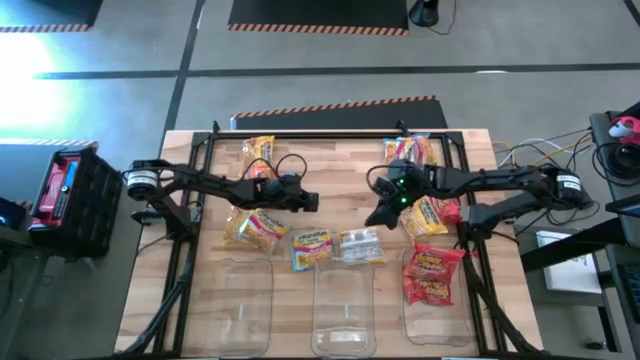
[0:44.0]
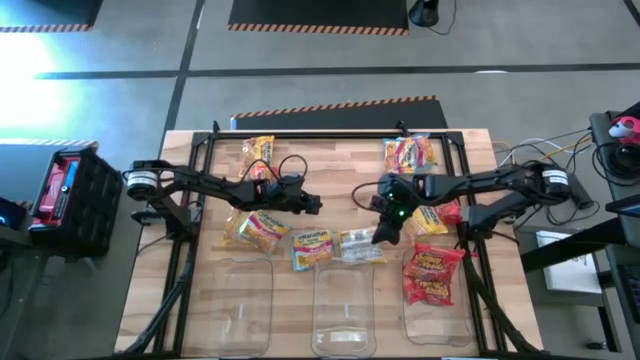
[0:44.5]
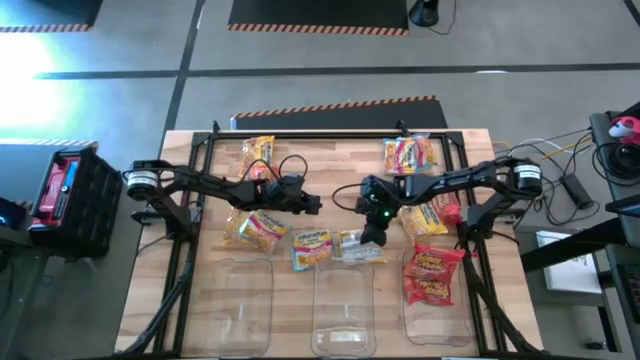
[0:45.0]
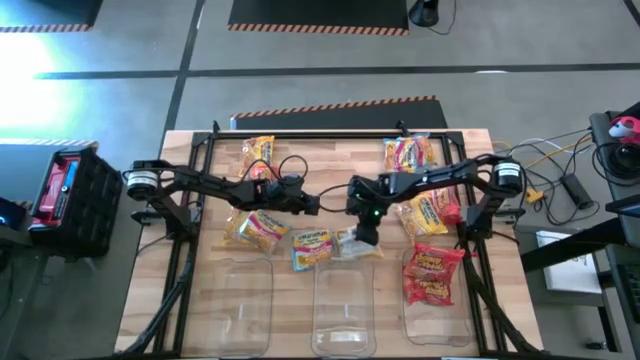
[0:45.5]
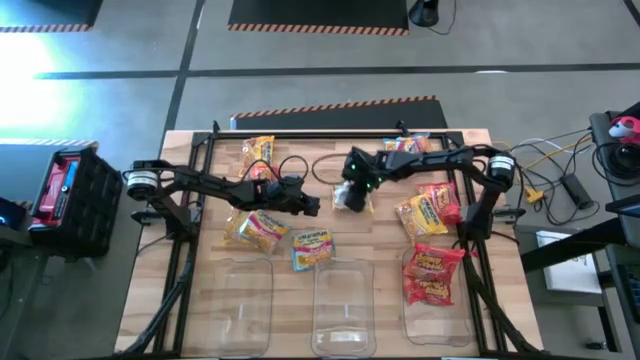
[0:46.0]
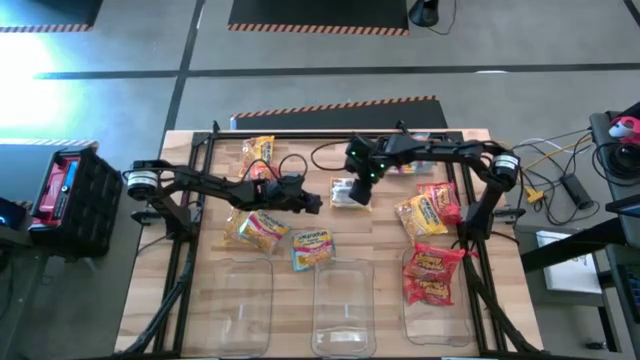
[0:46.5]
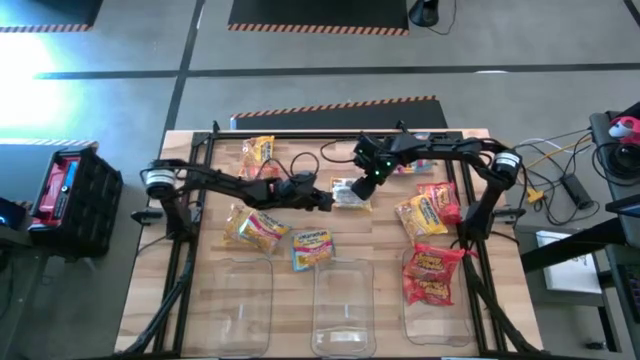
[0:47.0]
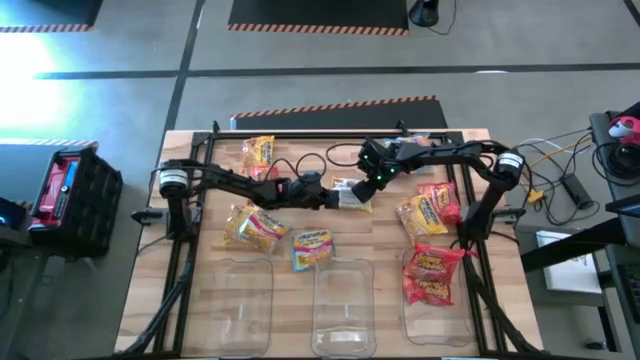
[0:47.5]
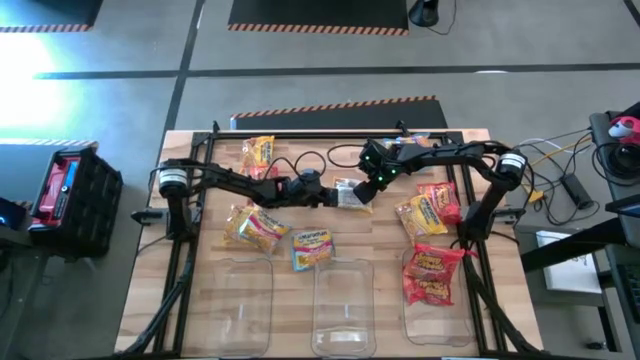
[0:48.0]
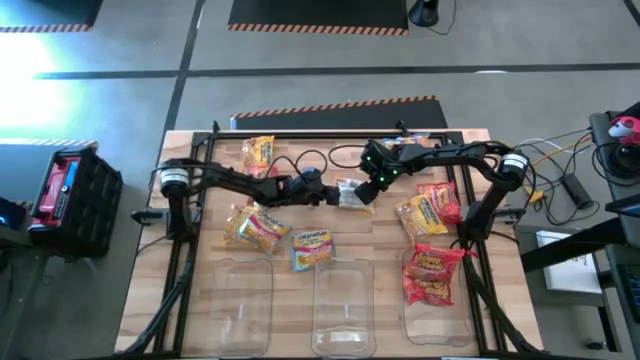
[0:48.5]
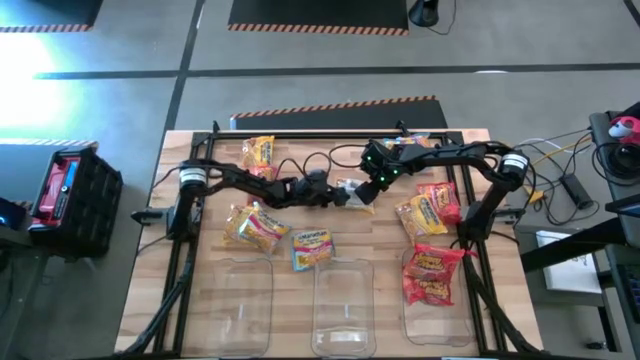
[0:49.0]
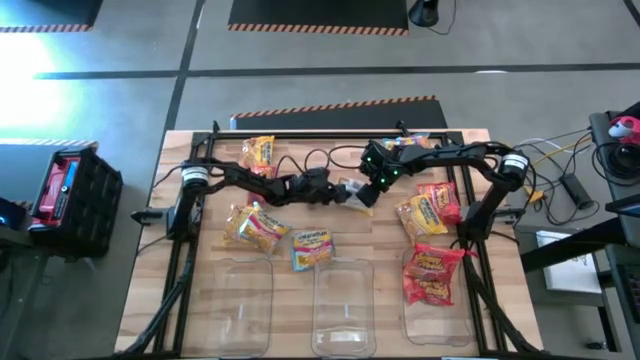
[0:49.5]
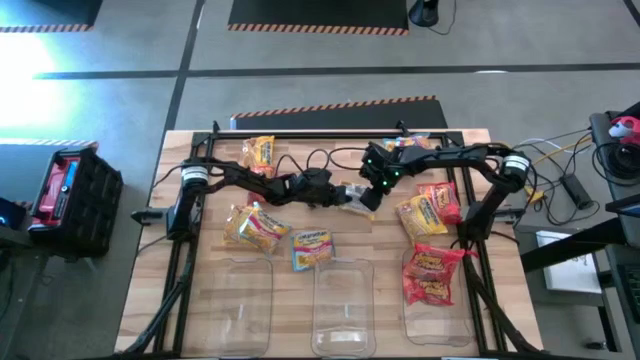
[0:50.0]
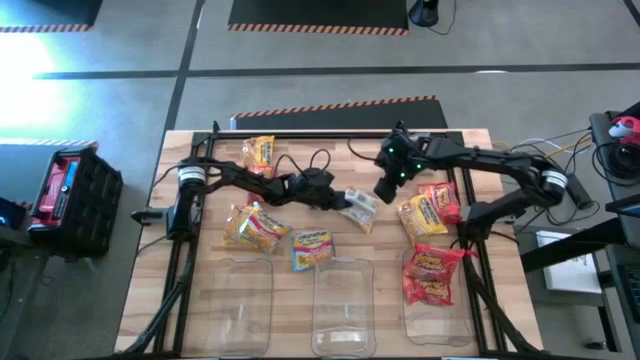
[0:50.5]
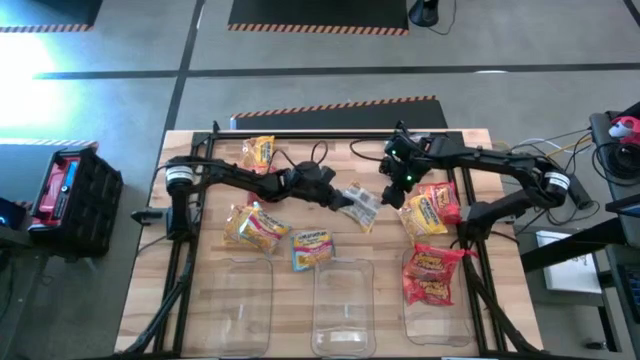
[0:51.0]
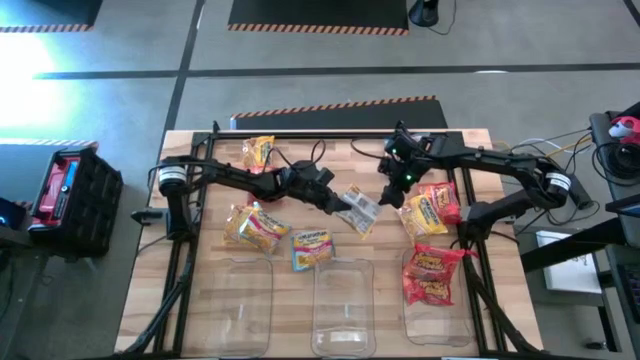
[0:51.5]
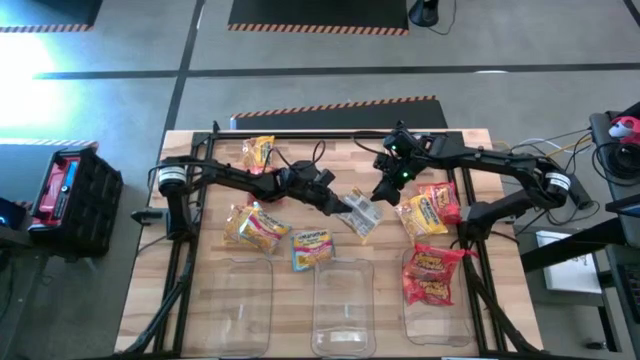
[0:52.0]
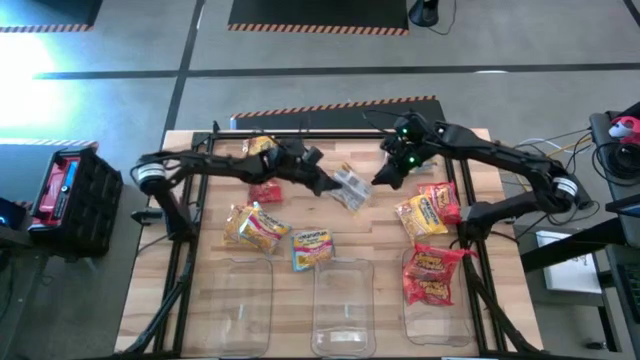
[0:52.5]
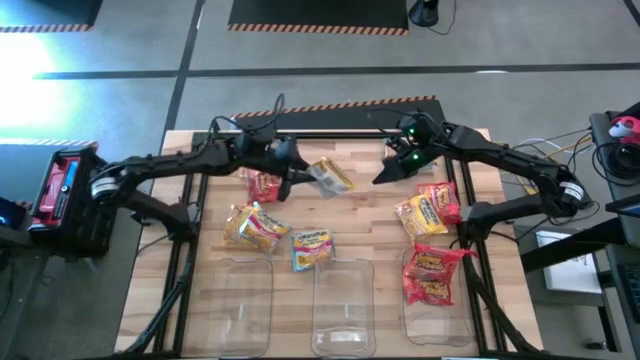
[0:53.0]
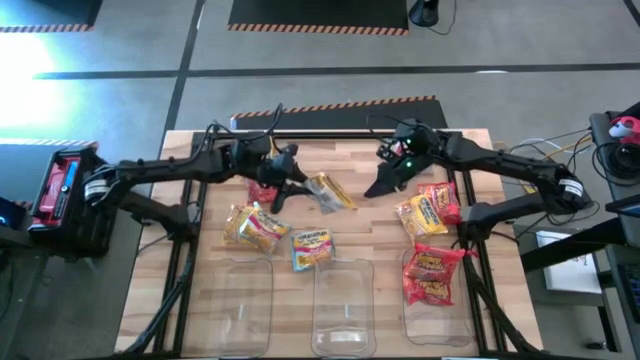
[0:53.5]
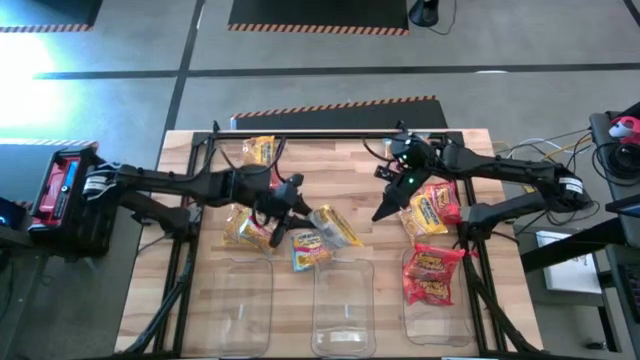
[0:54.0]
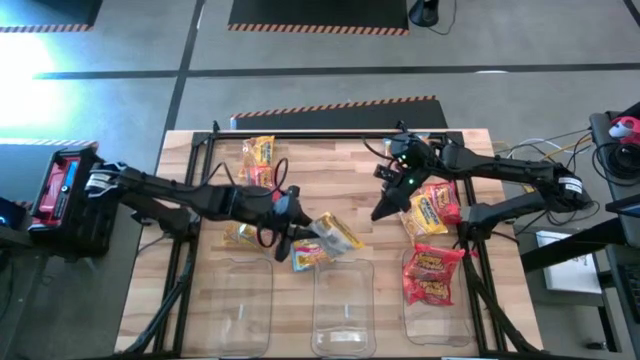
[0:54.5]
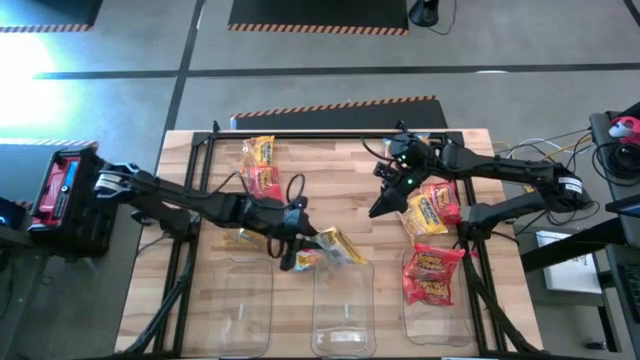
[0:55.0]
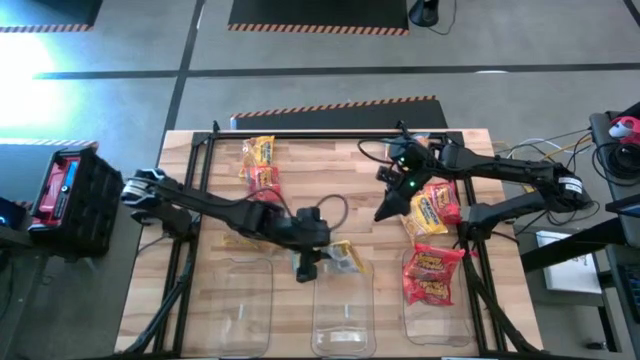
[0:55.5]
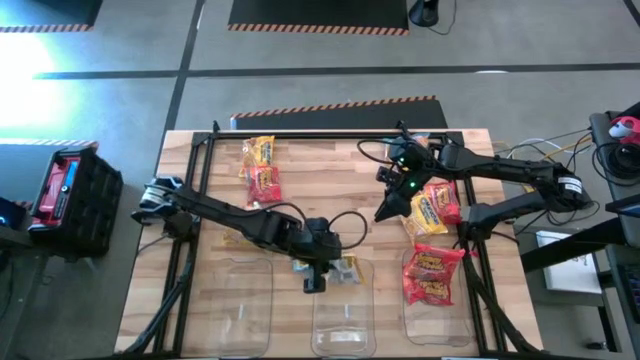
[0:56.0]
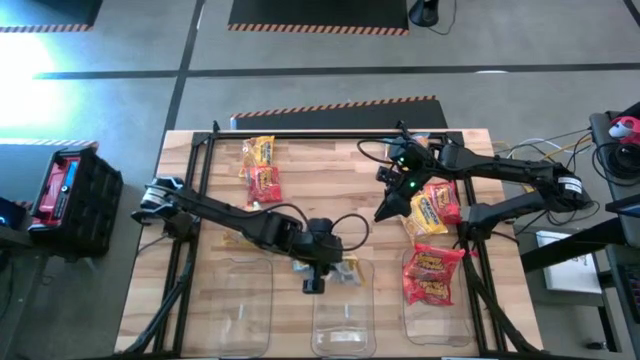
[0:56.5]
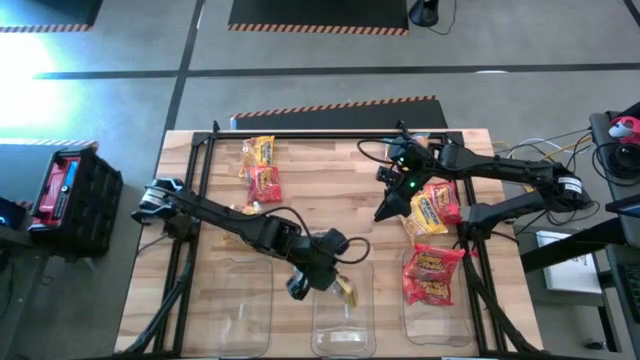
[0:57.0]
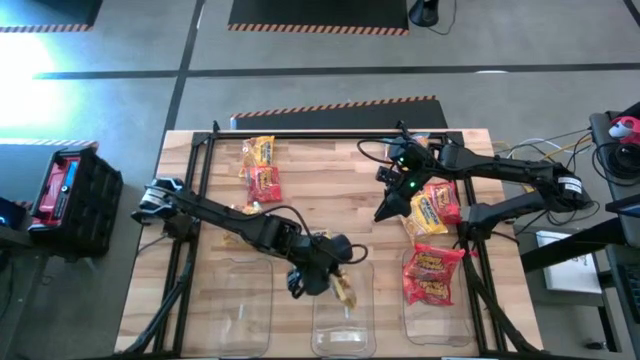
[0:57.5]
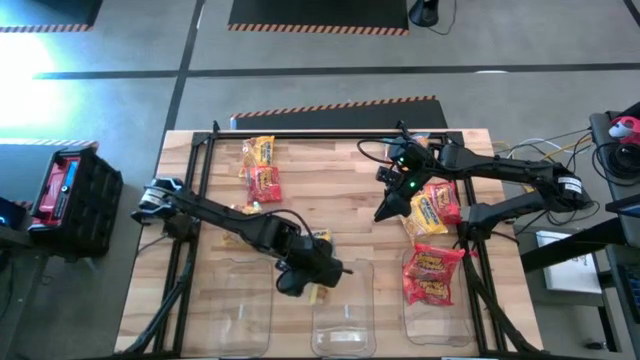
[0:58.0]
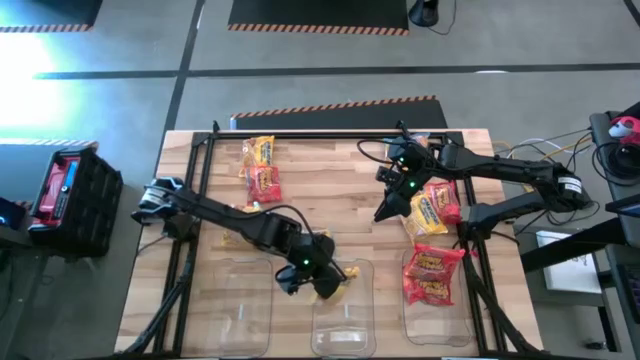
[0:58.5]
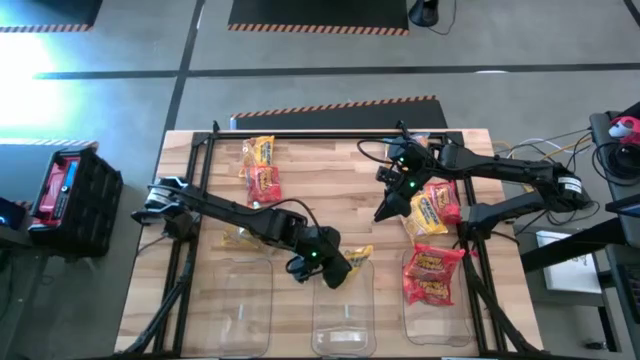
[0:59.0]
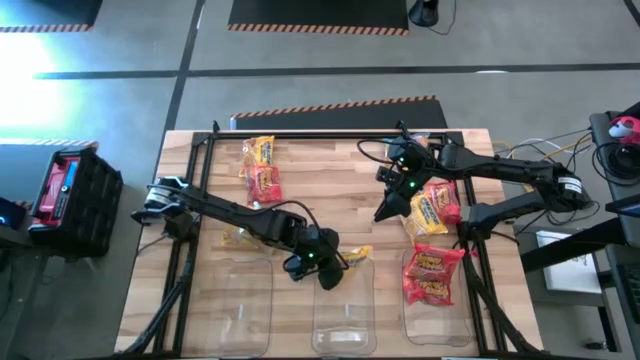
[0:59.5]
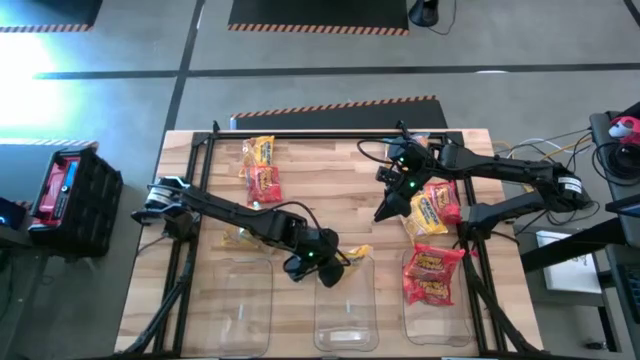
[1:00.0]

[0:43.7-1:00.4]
Task: Sort Maruchan noodles
Put the yellow noodle pack into the middle transparent bin
